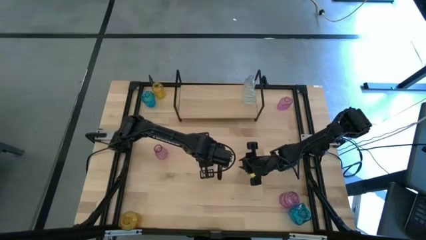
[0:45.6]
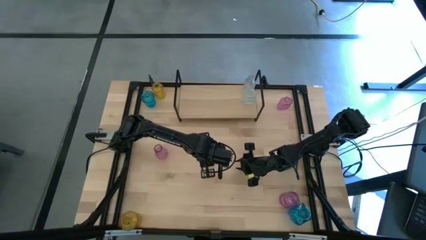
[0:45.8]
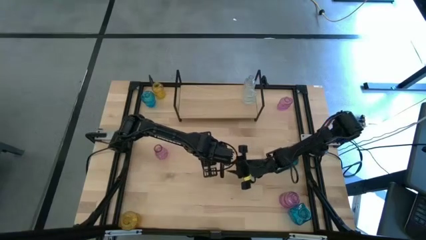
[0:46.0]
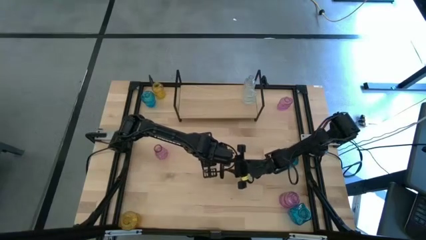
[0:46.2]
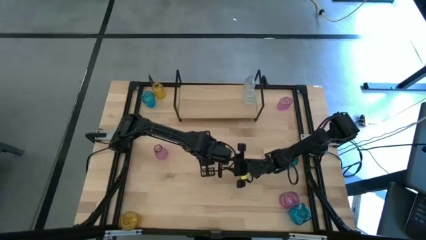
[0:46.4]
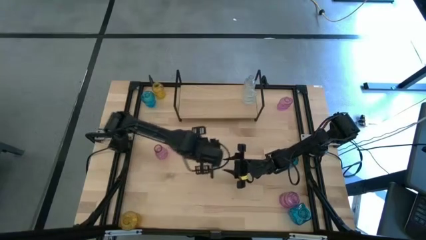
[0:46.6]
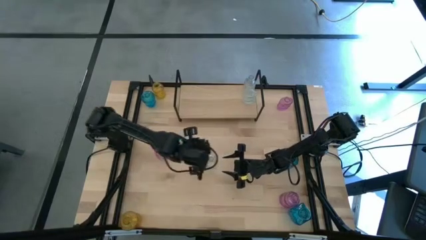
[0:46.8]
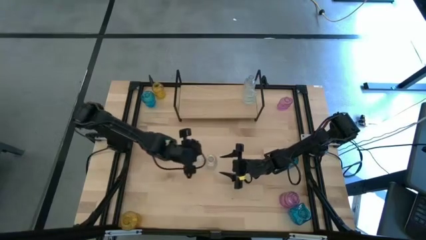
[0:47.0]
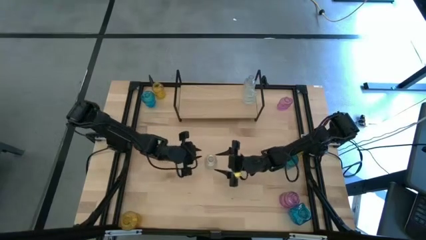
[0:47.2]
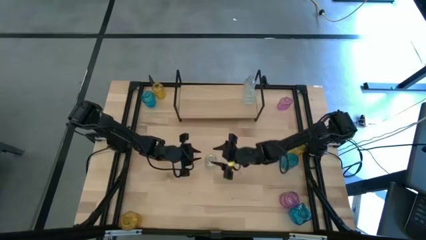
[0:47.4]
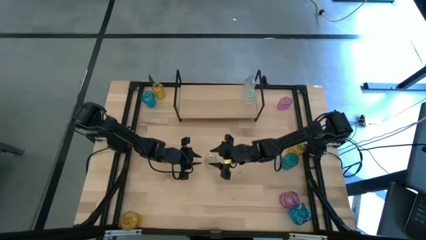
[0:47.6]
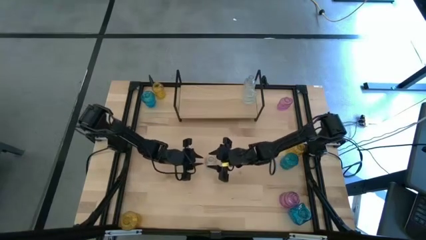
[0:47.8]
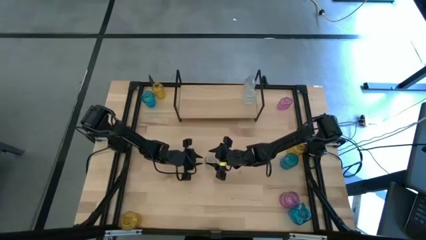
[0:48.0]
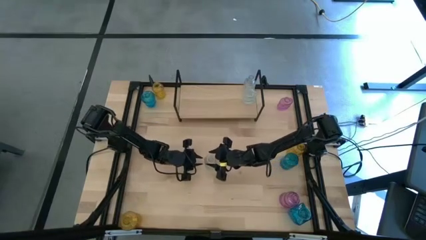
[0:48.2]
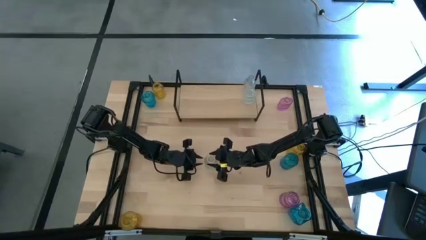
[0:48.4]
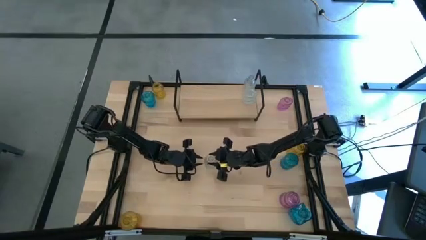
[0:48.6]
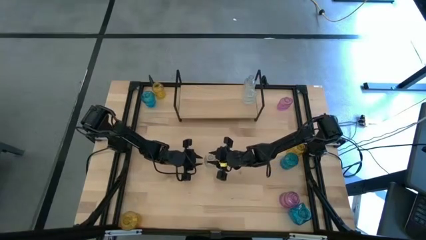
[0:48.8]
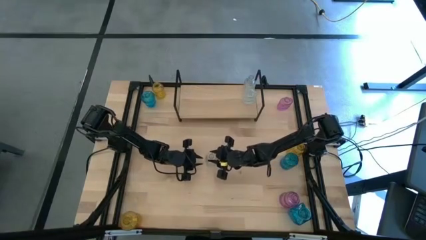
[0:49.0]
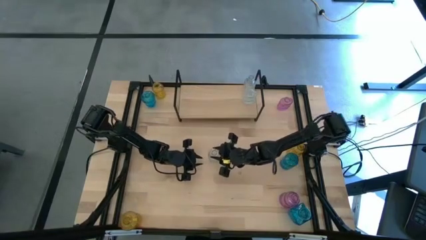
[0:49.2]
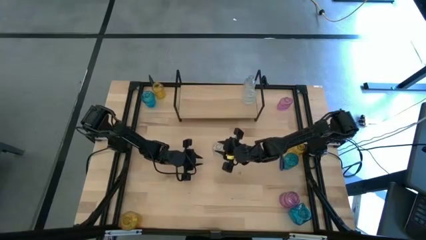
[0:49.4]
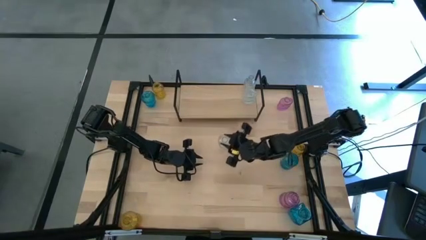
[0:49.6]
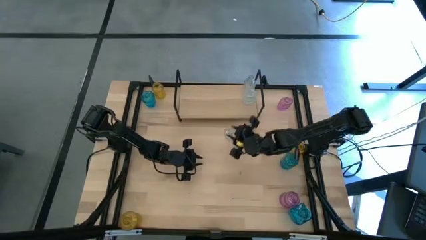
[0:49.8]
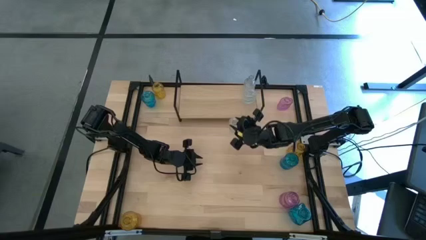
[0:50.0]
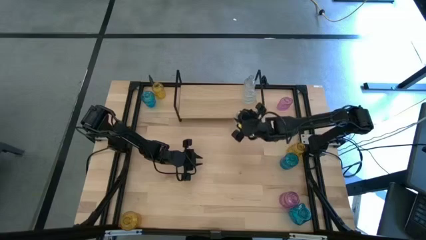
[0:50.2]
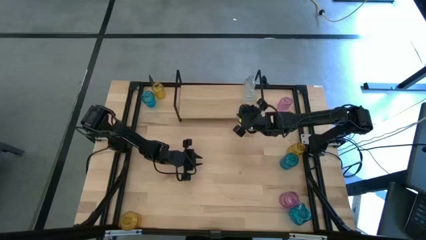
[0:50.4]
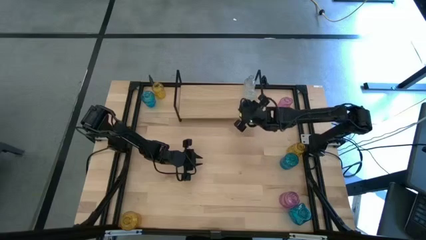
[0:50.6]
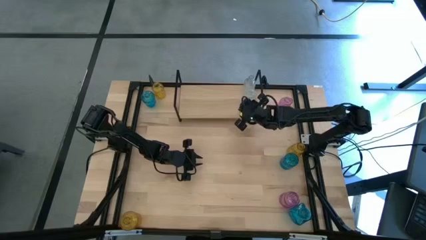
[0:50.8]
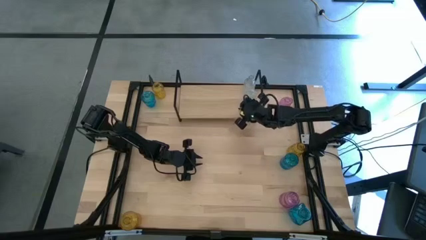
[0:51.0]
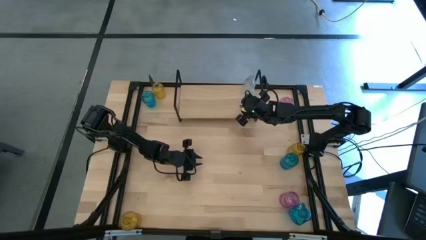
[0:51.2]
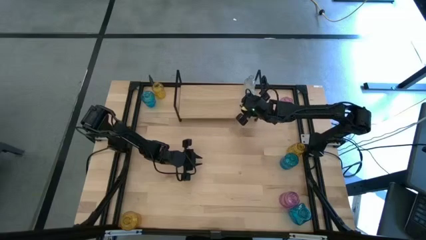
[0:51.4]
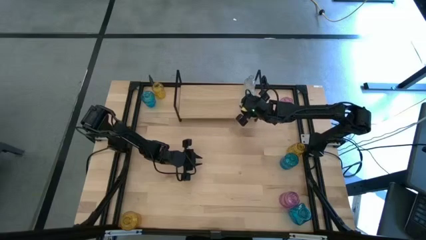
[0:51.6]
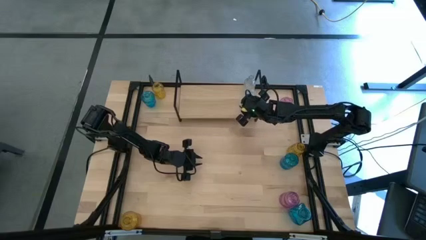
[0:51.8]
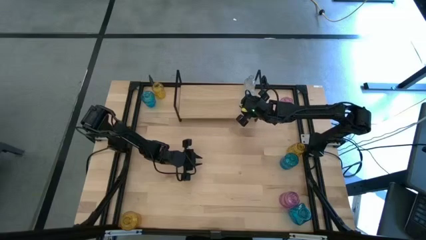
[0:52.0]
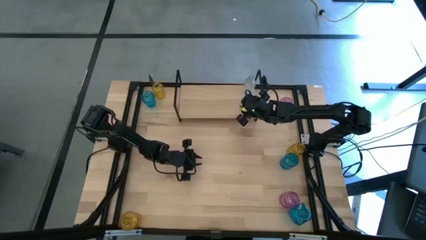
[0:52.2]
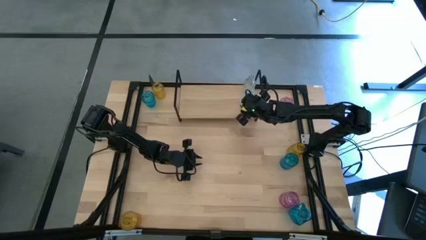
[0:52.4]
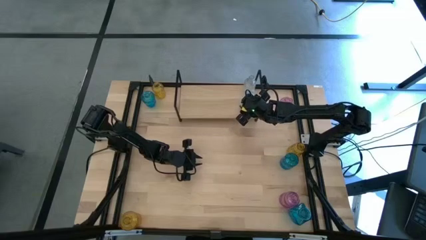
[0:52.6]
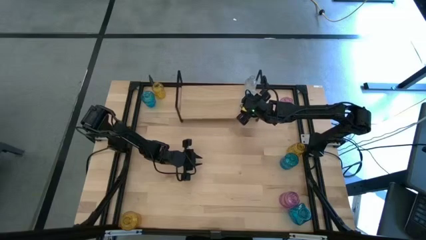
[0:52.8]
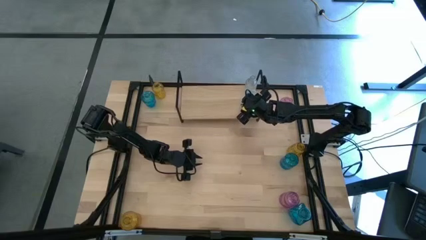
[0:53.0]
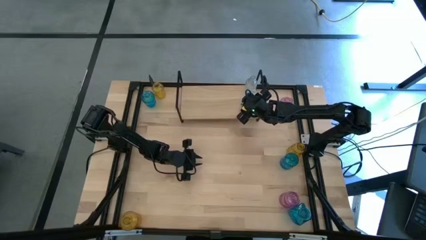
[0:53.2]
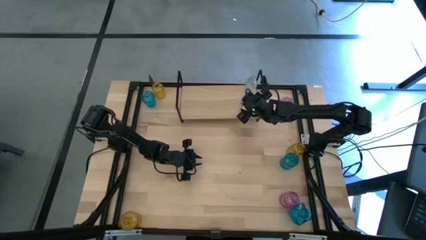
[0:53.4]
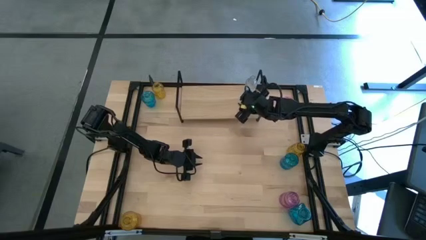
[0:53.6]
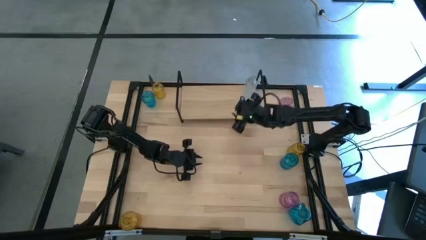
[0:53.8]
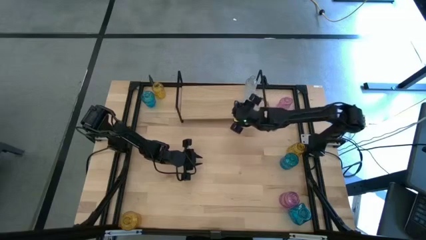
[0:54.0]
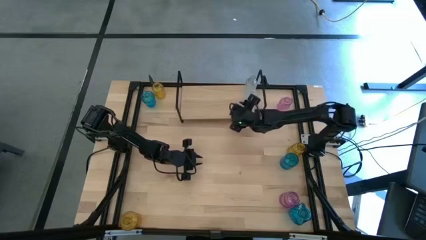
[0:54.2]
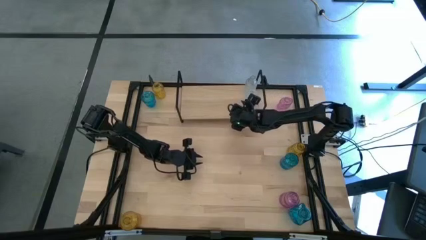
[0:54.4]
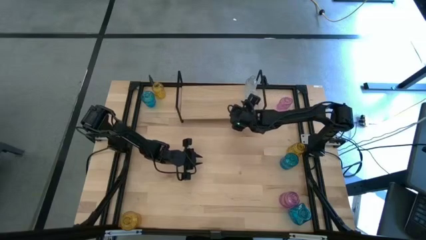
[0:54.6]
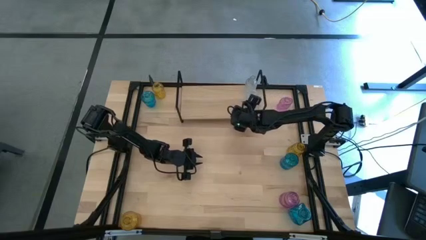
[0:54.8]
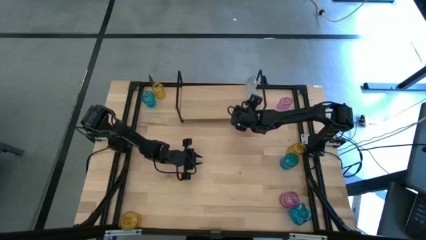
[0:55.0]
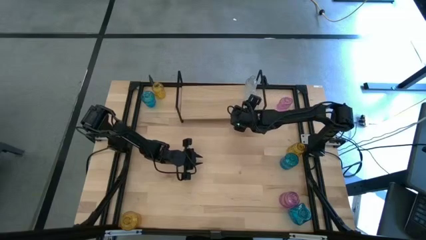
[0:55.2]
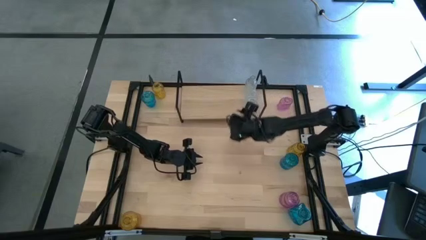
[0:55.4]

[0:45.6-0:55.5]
Task: sort vases onto shelf
Put the transparent vase aligned with the other transparent vase on the shelf

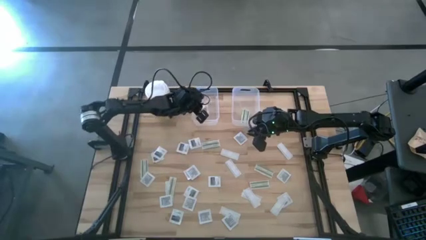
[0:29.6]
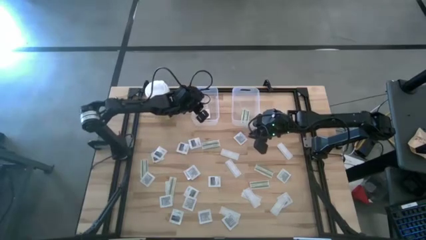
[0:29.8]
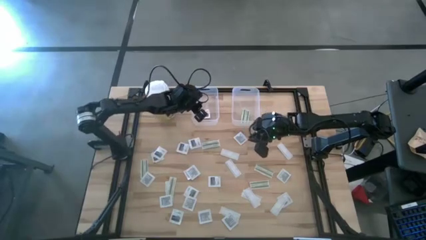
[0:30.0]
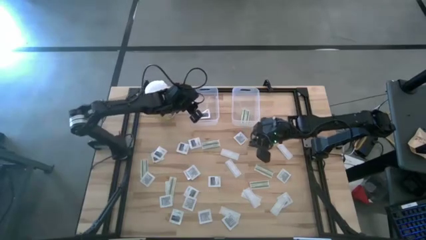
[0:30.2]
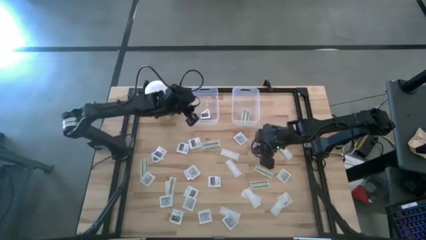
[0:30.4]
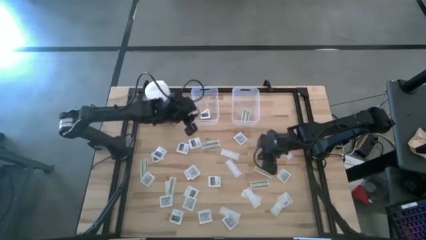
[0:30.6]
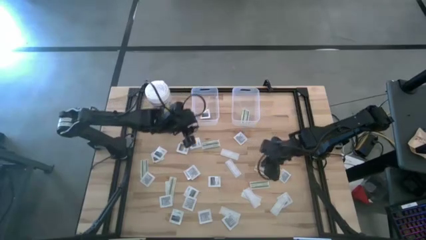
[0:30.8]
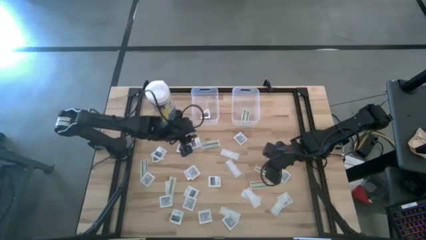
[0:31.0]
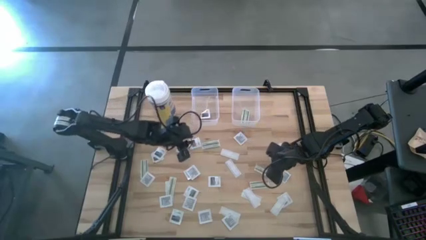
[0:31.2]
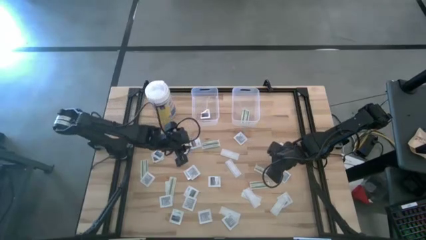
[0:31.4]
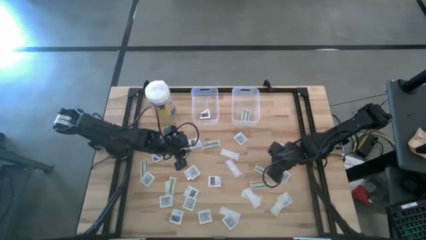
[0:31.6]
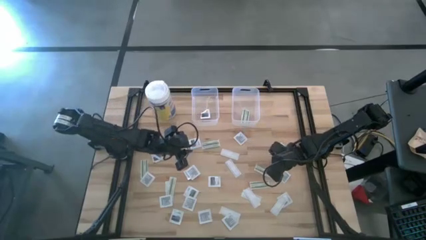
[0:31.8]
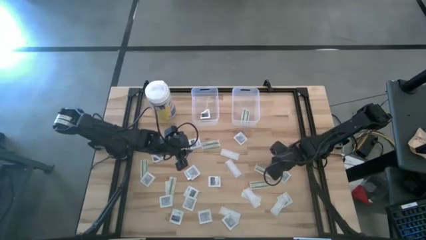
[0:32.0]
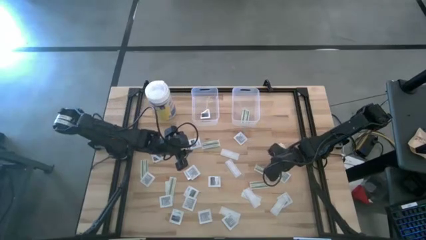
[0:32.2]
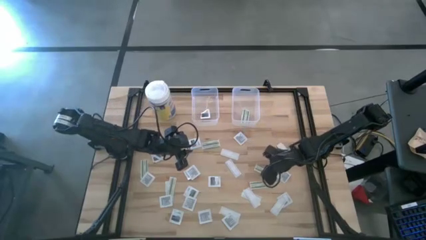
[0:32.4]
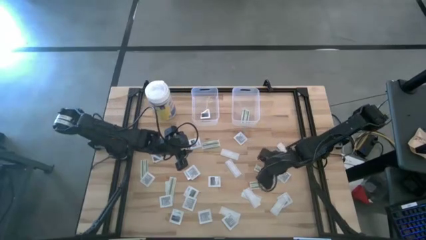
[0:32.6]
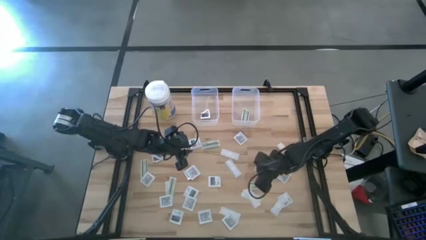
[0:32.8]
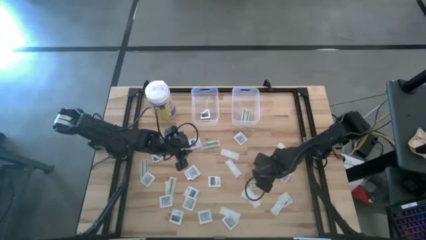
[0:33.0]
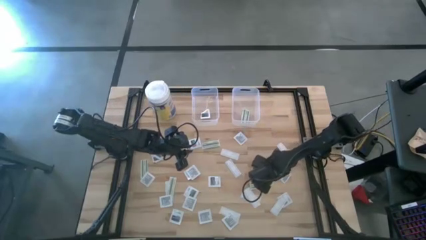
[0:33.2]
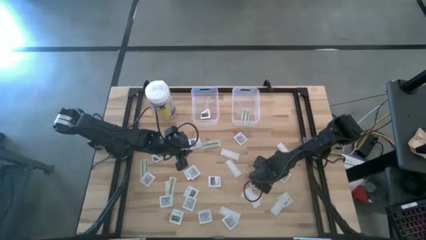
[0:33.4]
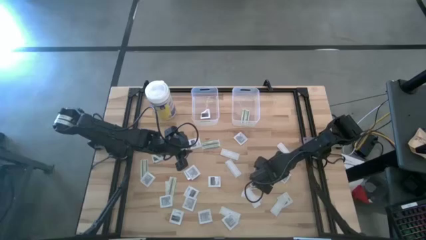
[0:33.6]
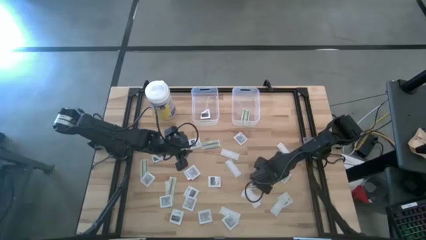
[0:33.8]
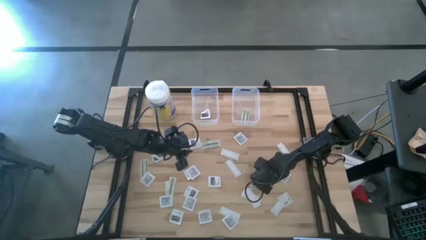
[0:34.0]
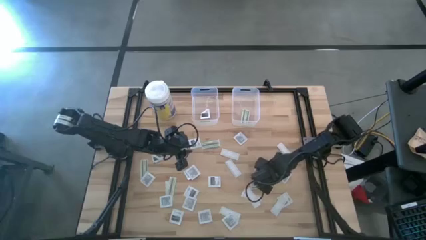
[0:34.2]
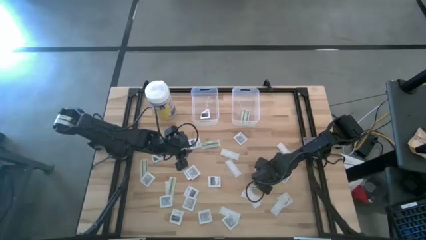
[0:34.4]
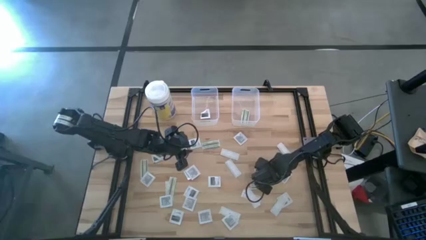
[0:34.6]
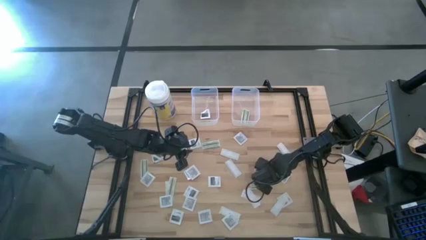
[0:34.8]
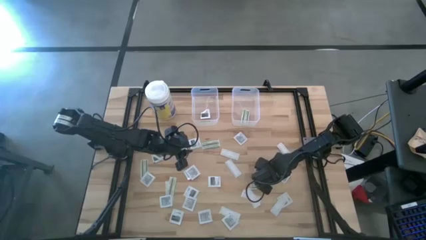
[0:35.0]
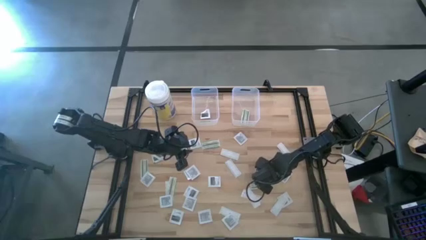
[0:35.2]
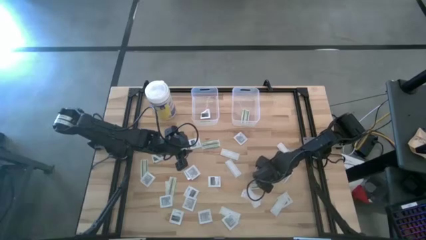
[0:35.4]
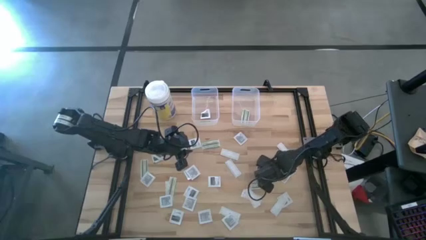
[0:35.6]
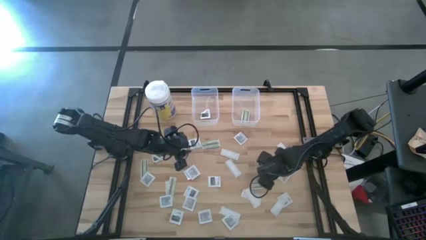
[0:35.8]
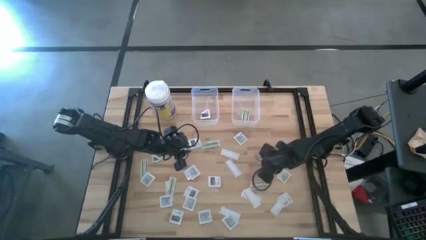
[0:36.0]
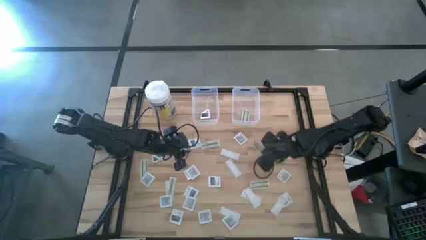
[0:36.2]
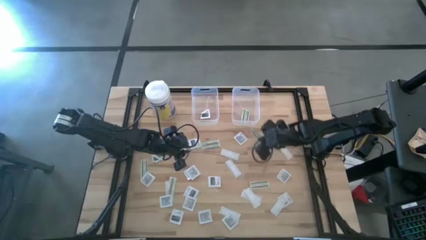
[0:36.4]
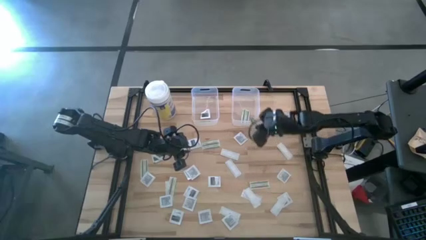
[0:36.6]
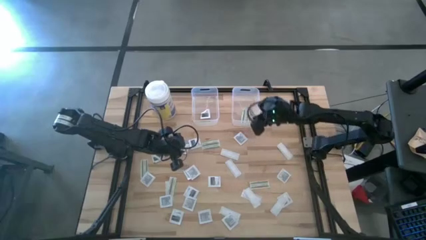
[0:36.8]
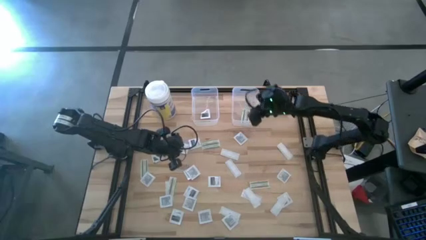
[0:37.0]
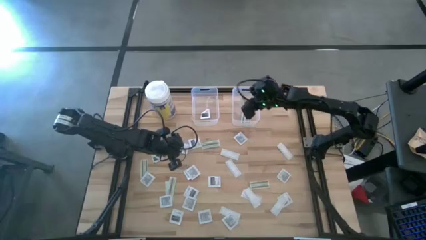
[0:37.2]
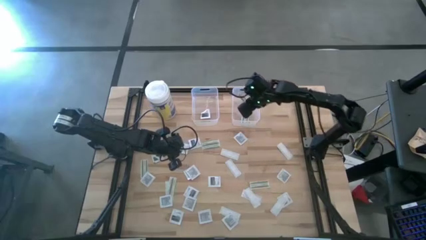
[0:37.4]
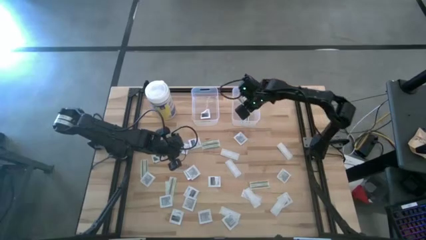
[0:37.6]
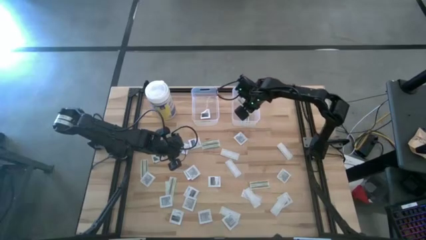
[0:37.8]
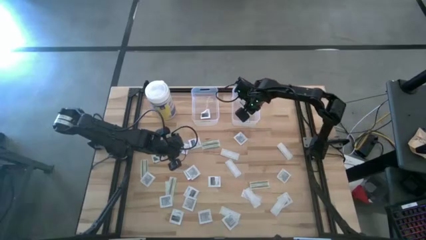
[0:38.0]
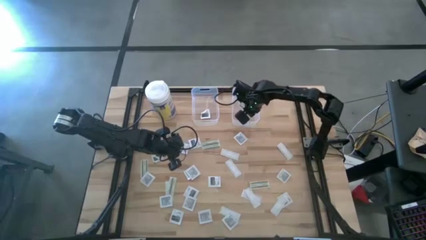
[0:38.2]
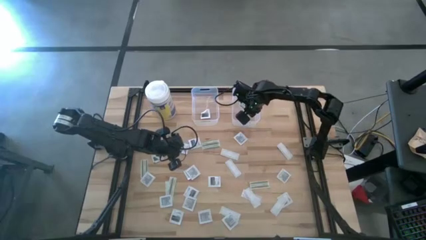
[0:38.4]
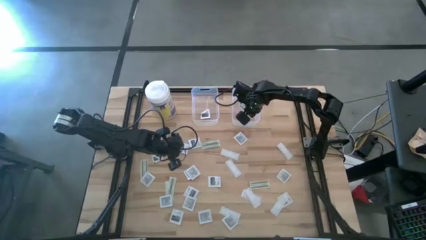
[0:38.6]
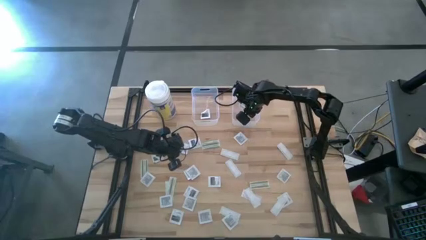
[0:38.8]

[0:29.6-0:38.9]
Task: Pick & Place First Aid Supplies
Put the bandage into the right transparent bin
